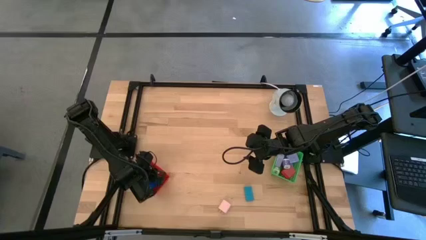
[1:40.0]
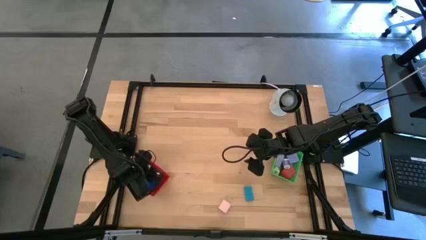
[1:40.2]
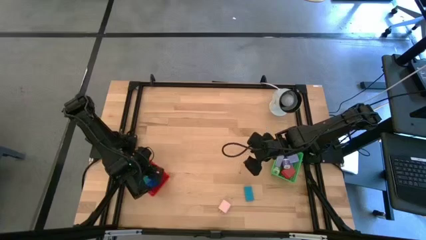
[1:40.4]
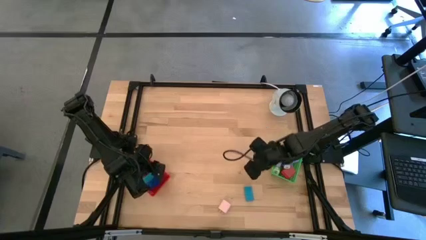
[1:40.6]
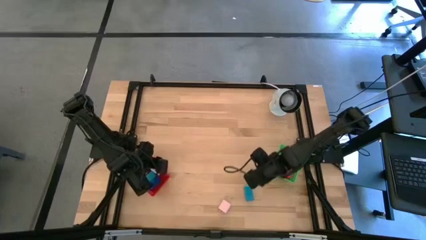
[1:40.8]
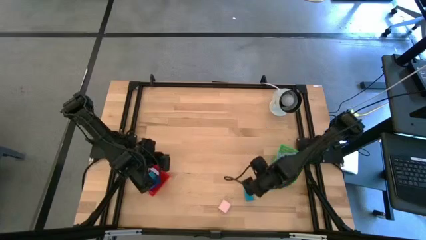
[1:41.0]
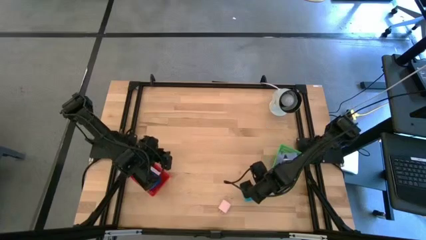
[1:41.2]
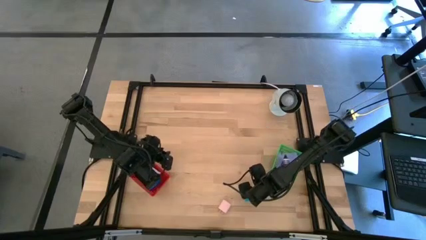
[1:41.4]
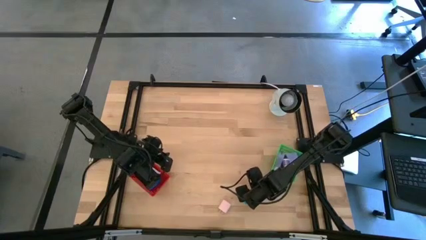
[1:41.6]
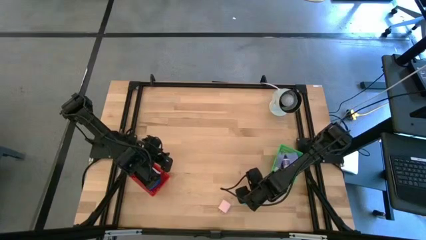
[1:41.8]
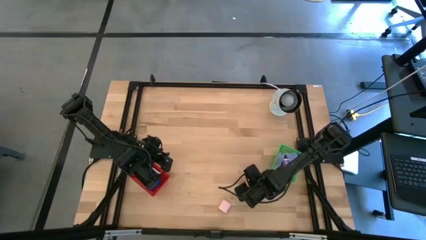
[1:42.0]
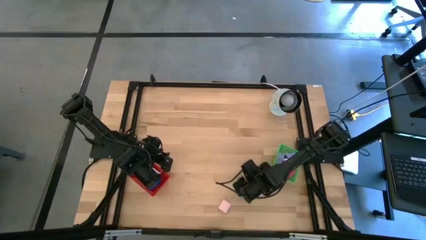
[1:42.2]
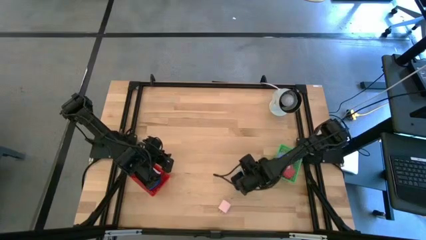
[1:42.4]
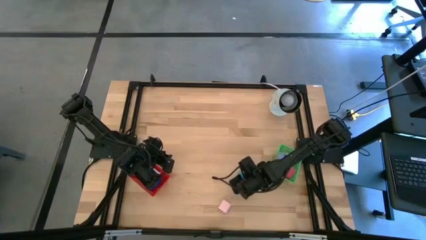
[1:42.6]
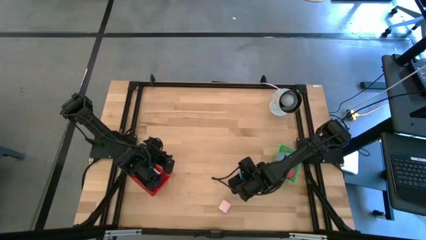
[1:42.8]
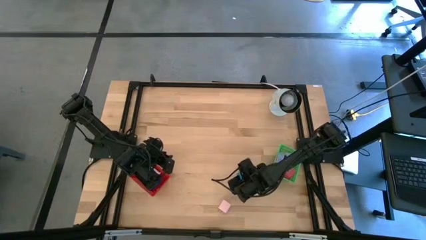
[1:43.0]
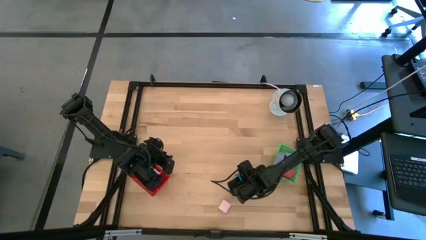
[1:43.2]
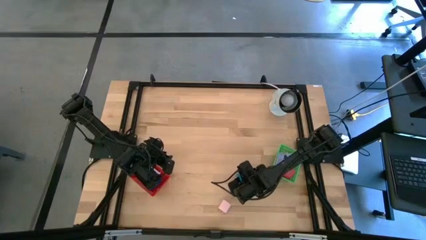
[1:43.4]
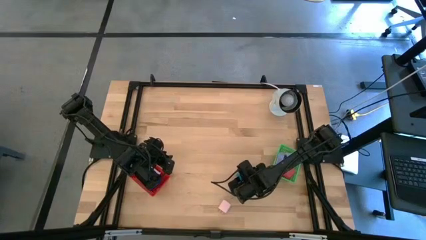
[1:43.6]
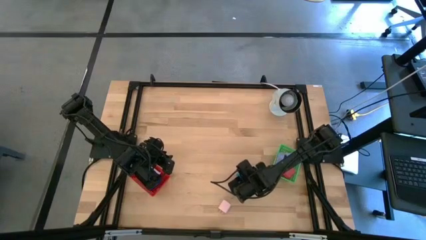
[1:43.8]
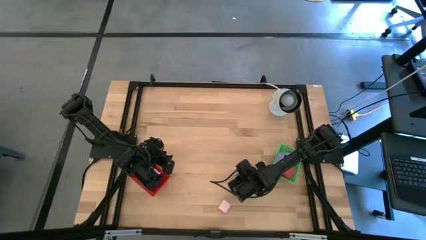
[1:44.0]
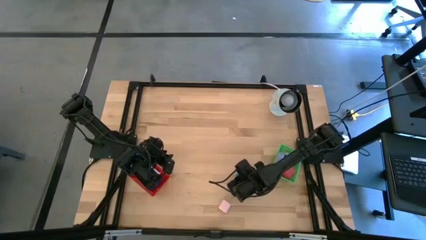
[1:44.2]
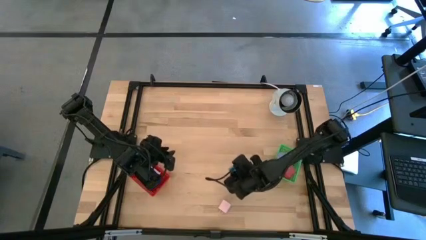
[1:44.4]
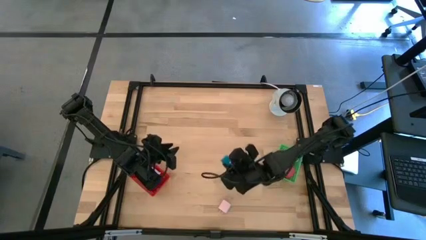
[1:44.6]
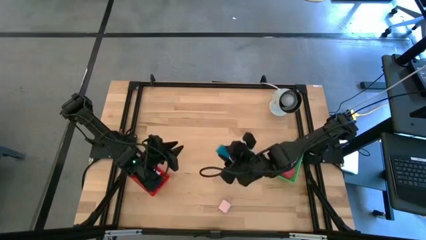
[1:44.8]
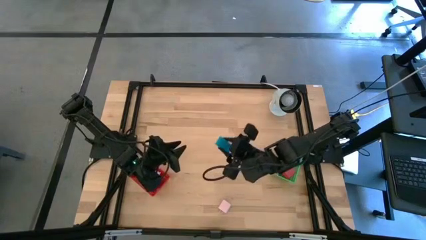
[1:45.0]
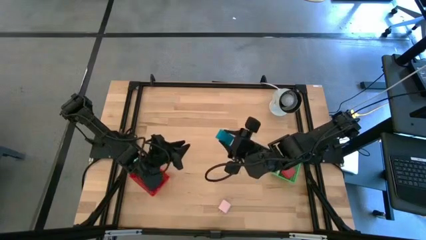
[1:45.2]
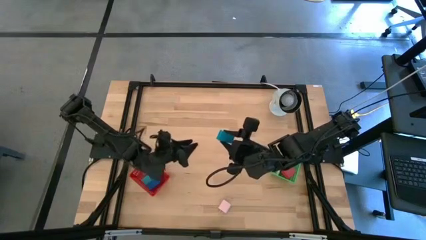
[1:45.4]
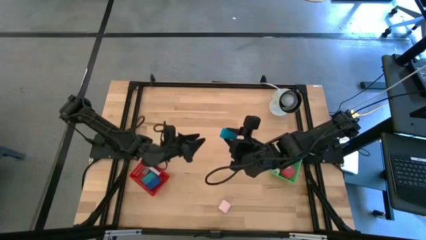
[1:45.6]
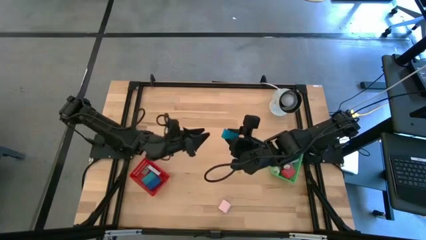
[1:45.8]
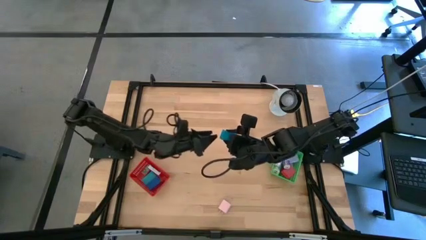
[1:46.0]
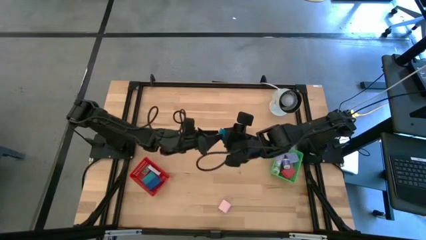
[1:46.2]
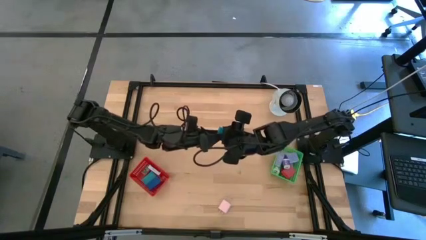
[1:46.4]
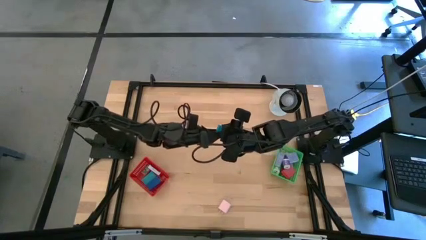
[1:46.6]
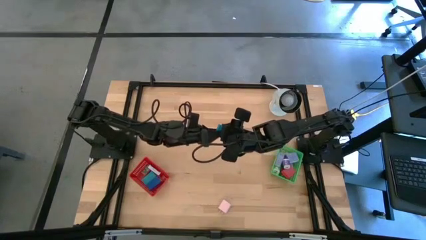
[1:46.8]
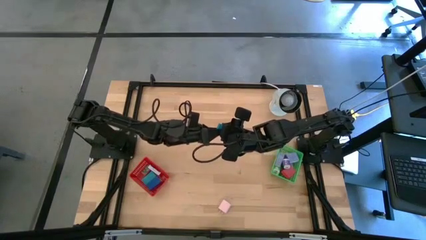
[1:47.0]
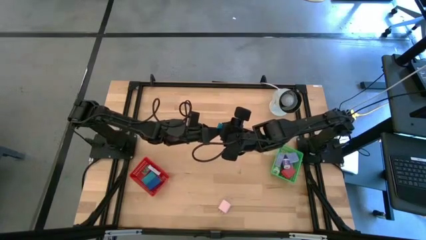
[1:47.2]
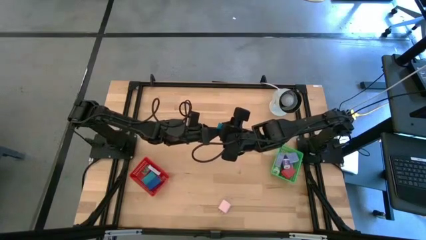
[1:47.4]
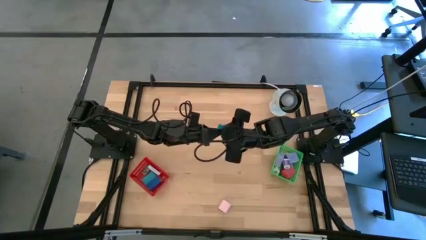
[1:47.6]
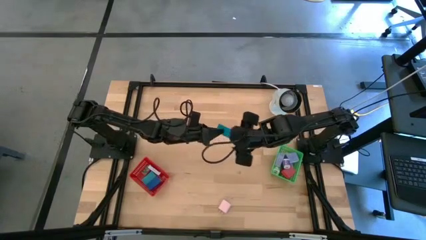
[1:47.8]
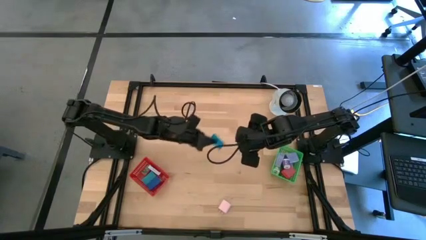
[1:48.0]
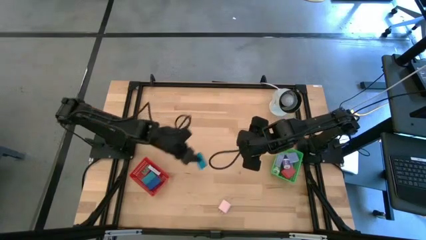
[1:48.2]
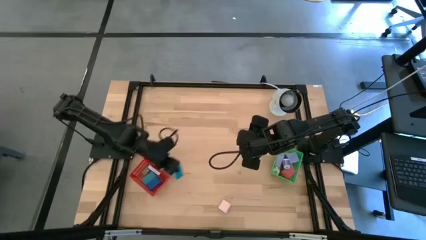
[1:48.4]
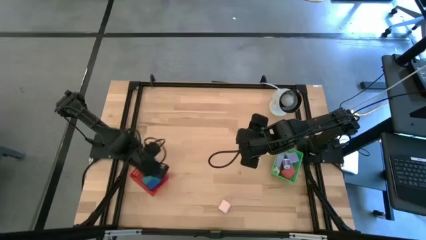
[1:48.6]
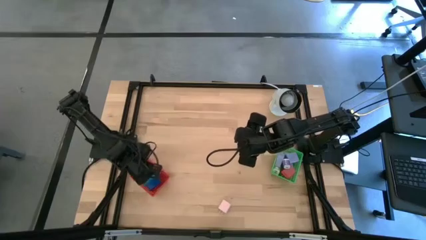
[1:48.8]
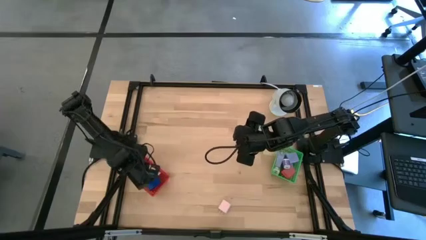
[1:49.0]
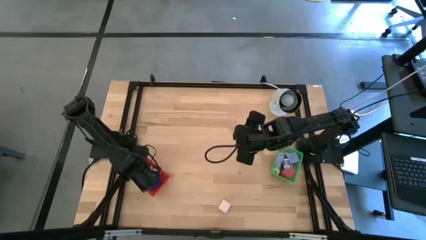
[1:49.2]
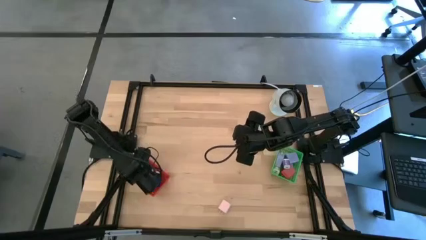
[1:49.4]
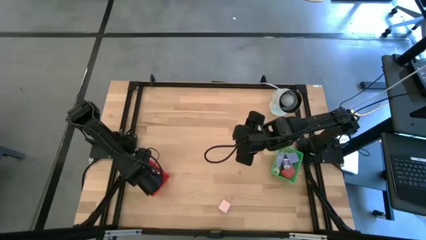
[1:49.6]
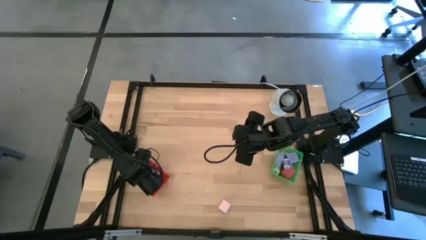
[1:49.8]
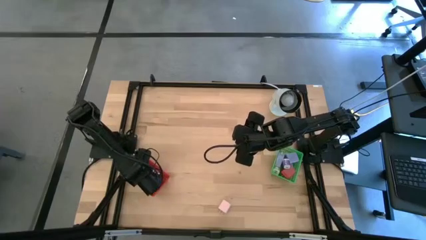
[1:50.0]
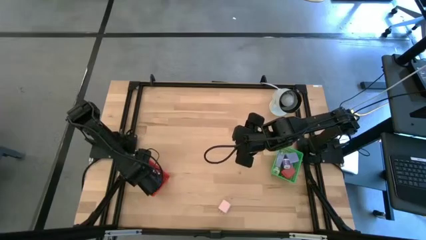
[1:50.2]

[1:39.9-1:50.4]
Task: Pick & Place Office items
Put the light blue digital clock into the red bin

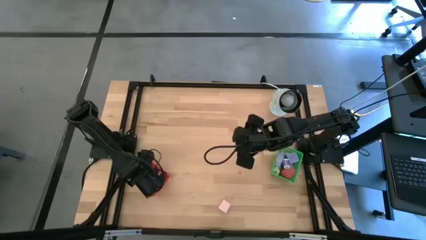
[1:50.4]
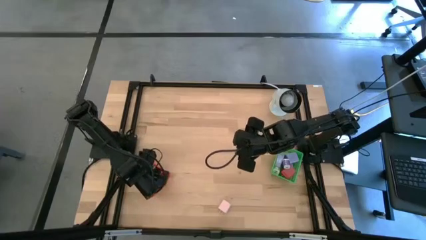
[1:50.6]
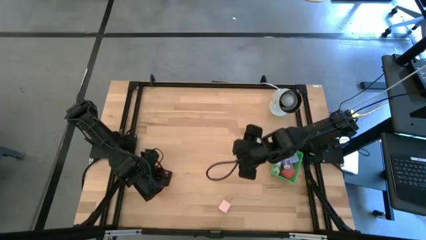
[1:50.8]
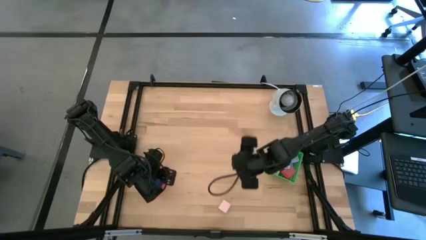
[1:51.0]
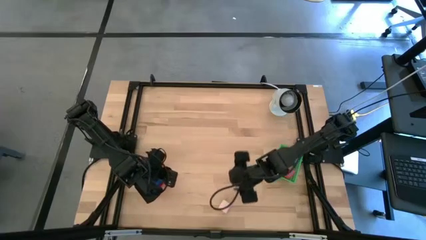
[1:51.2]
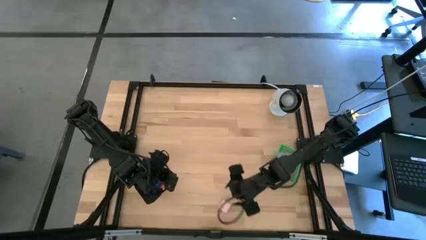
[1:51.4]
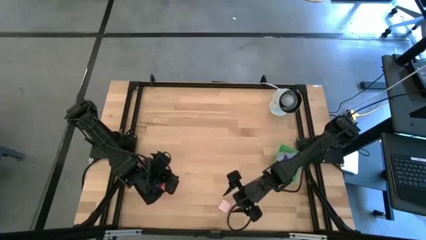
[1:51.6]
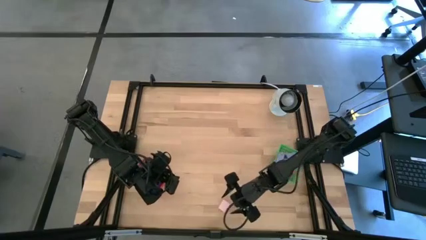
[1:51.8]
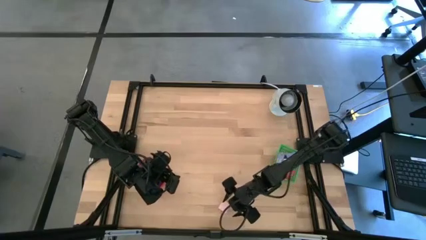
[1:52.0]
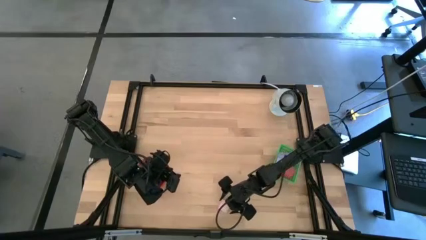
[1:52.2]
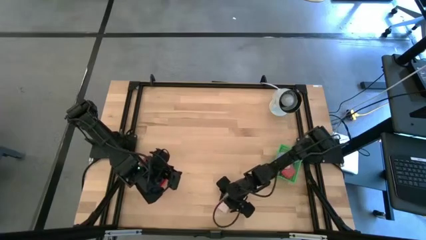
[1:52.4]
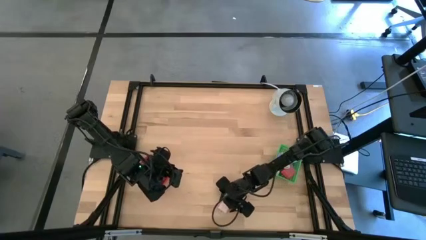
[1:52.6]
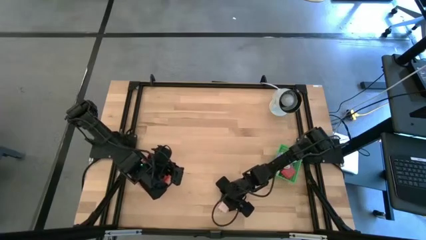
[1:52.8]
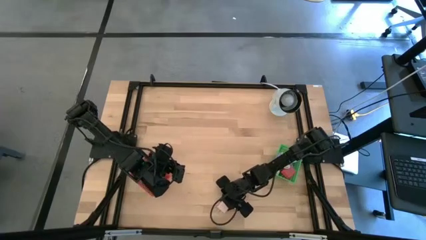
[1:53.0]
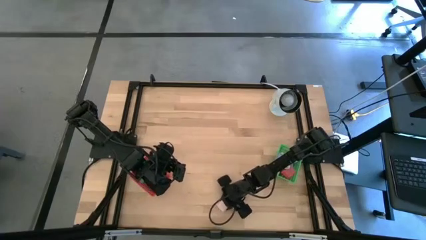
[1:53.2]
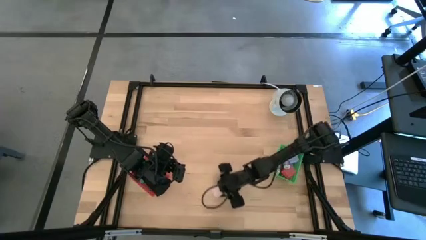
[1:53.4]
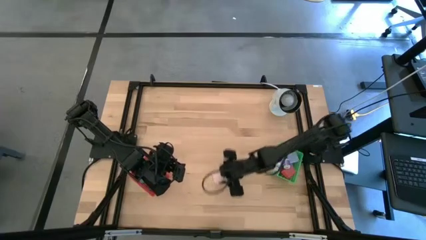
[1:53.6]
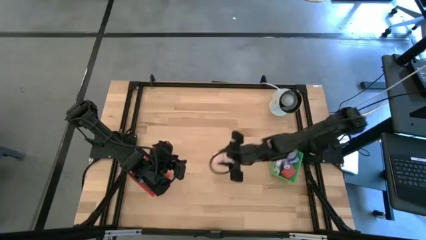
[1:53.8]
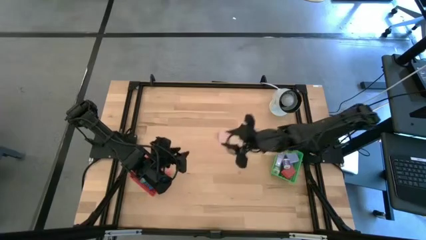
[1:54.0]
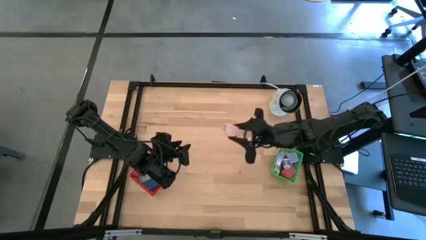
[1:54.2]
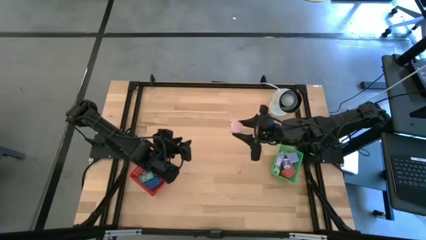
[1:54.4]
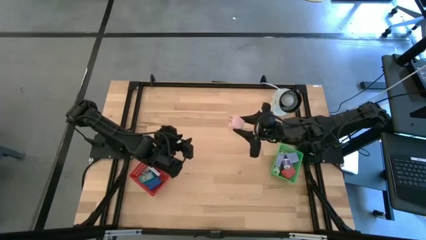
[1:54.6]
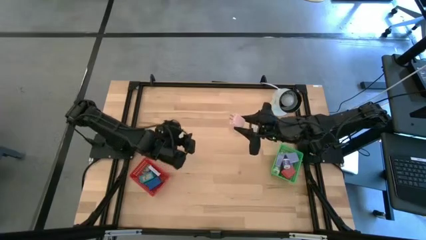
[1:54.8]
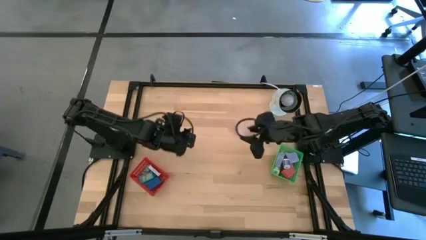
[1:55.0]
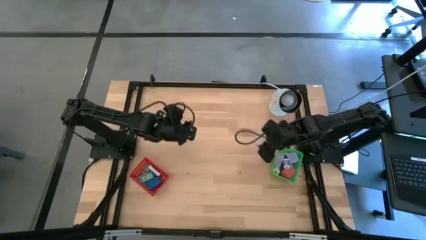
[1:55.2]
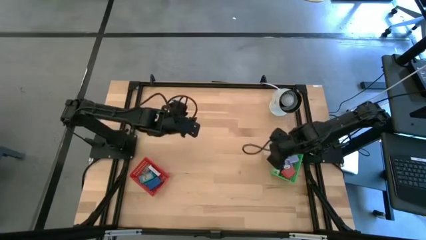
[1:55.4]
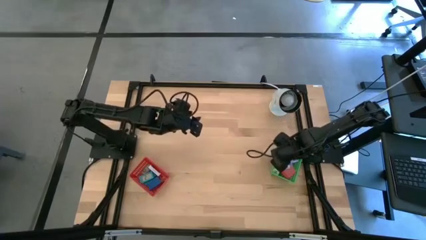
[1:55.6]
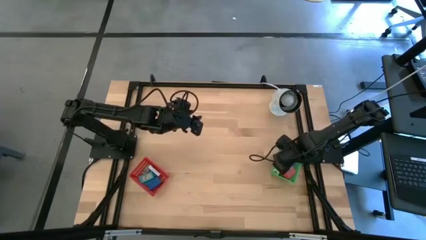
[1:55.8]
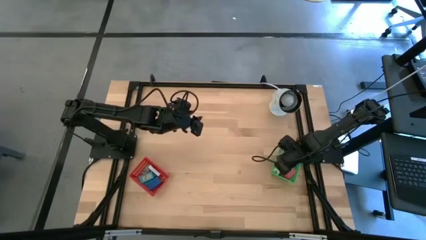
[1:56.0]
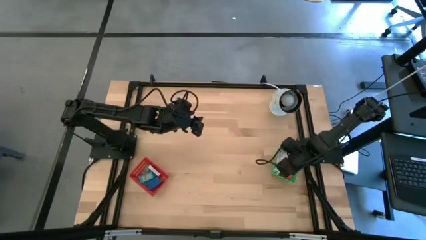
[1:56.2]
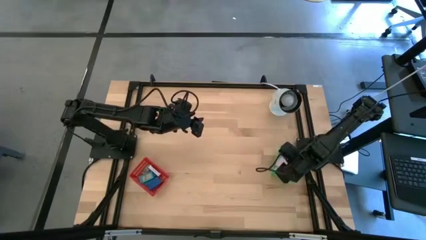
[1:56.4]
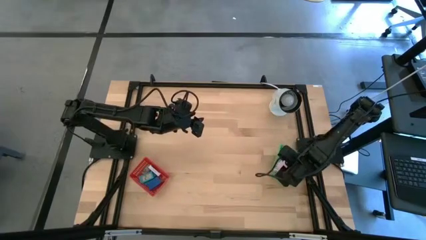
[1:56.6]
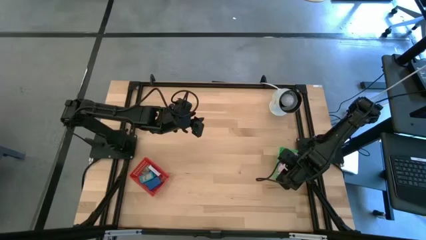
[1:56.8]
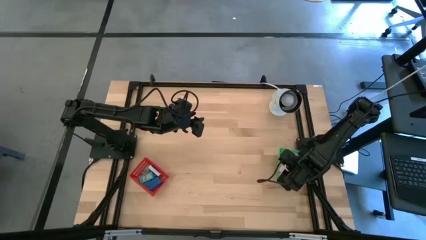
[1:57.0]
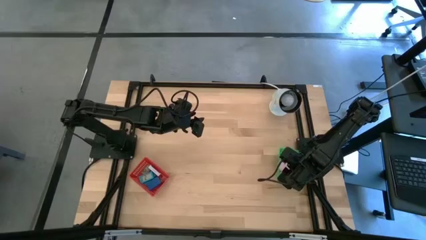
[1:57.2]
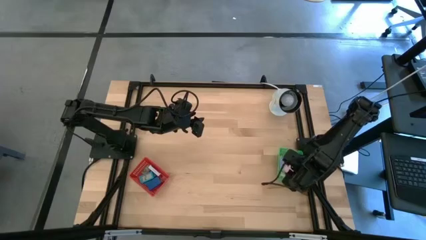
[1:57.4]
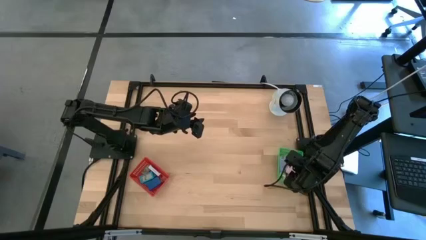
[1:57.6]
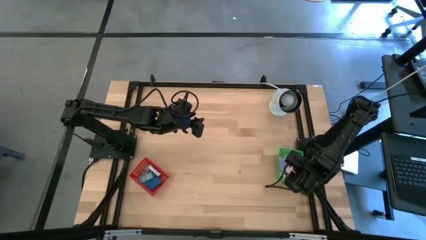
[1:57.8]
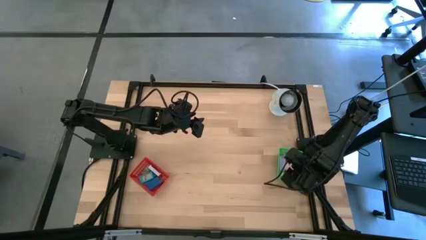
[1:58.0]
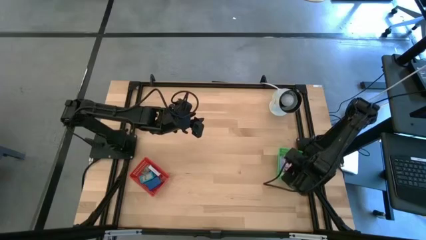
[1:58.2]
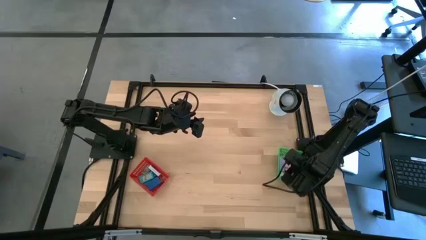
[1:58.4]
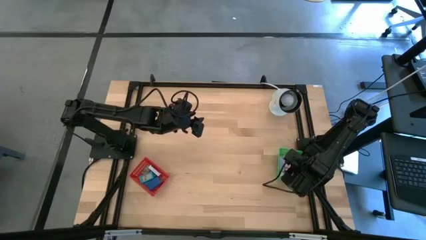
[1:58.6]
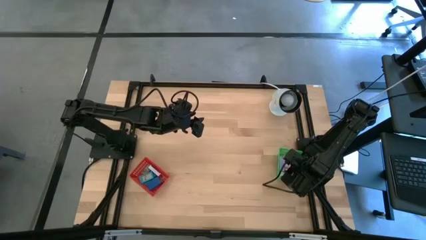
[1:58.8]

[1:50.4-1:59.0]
Put the light pink power adapter into the green bin
